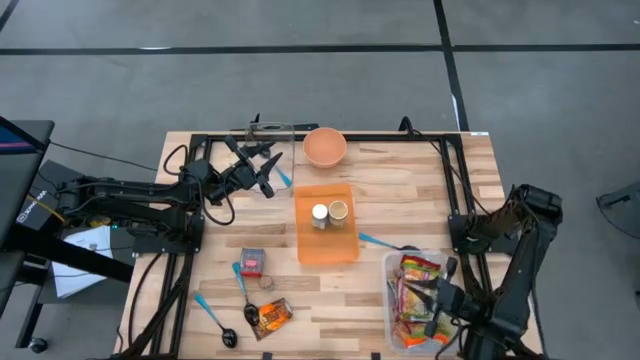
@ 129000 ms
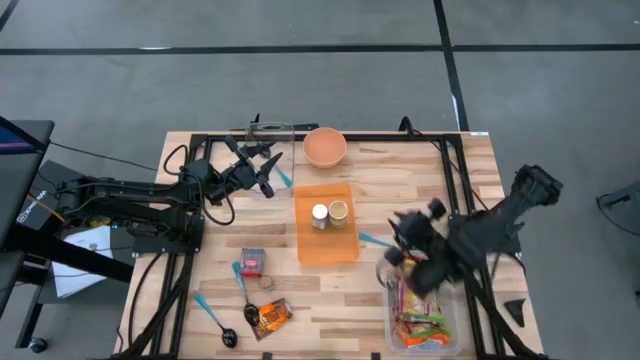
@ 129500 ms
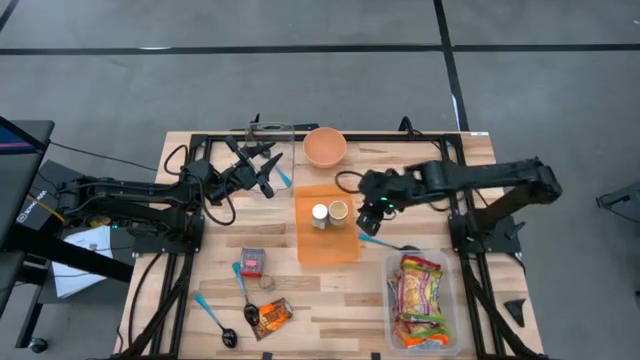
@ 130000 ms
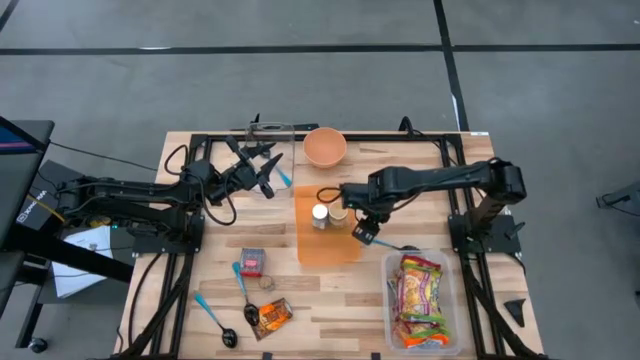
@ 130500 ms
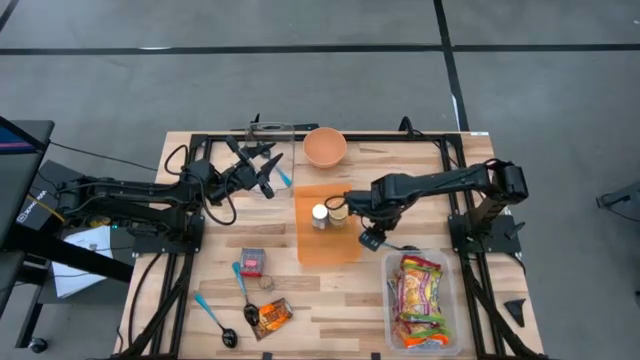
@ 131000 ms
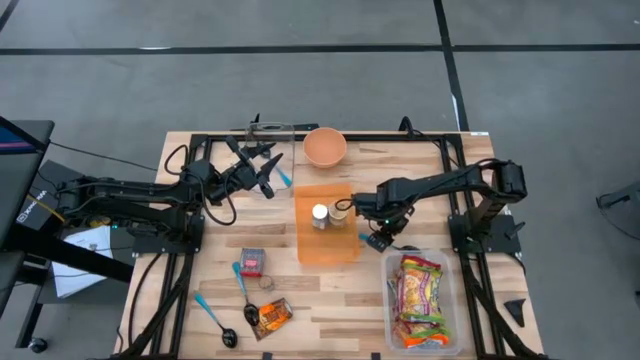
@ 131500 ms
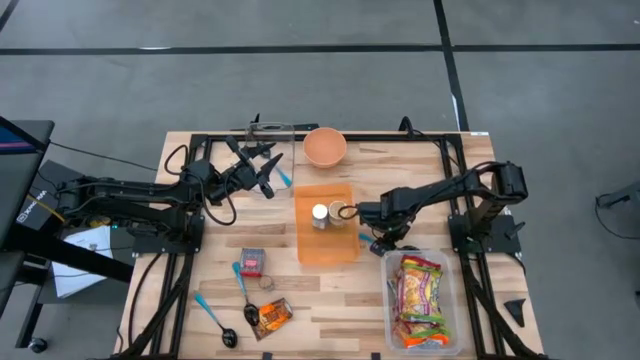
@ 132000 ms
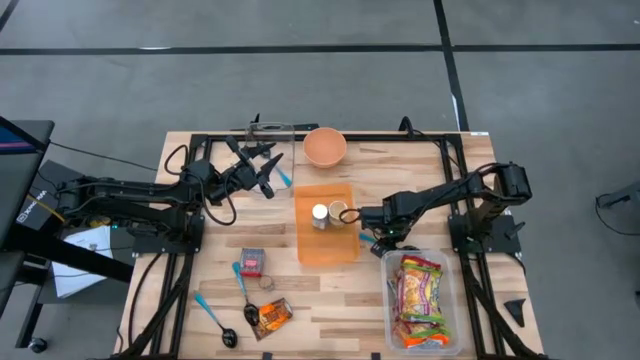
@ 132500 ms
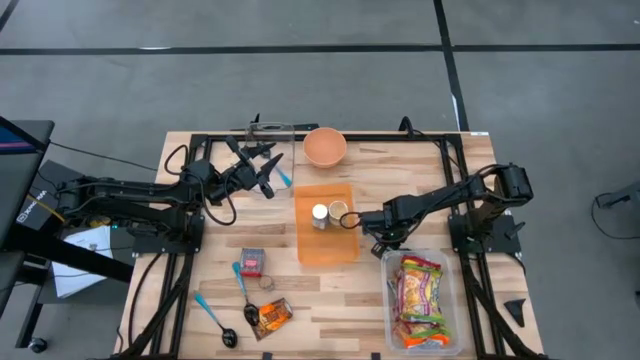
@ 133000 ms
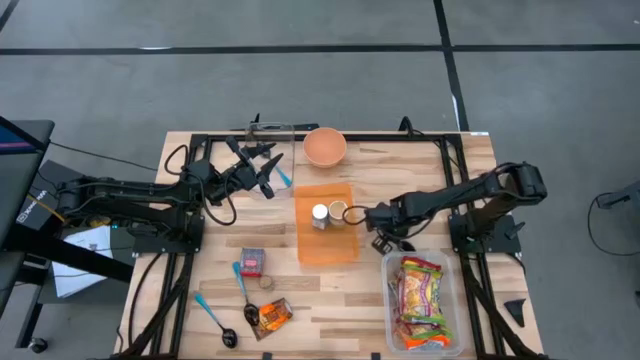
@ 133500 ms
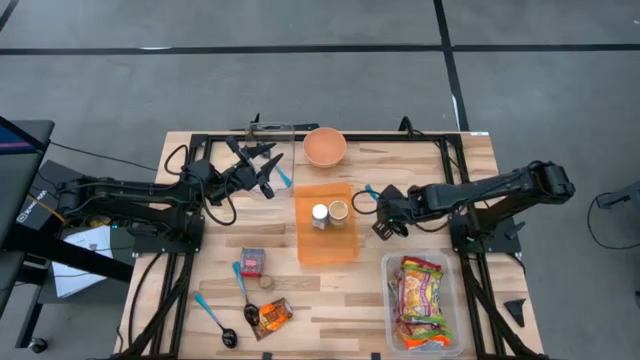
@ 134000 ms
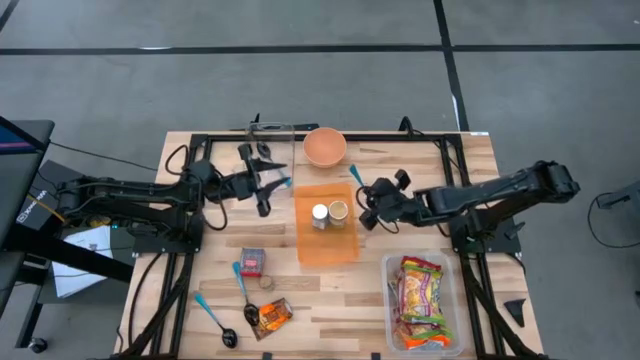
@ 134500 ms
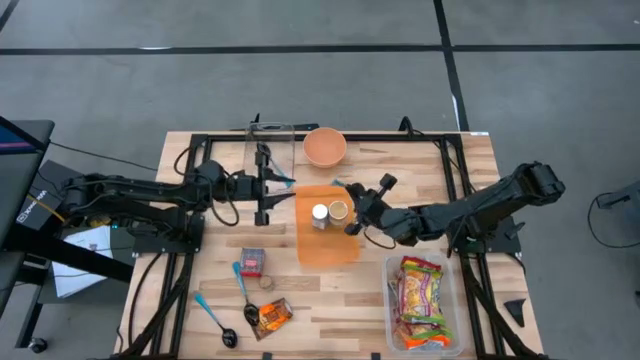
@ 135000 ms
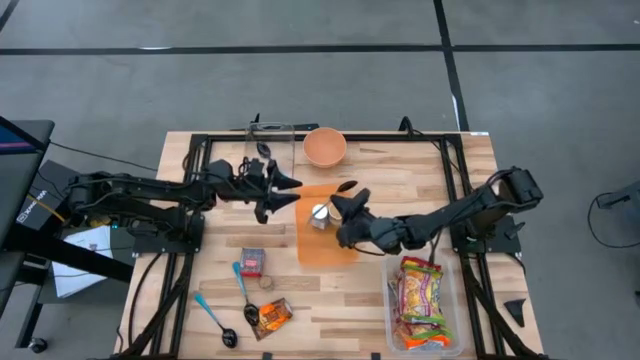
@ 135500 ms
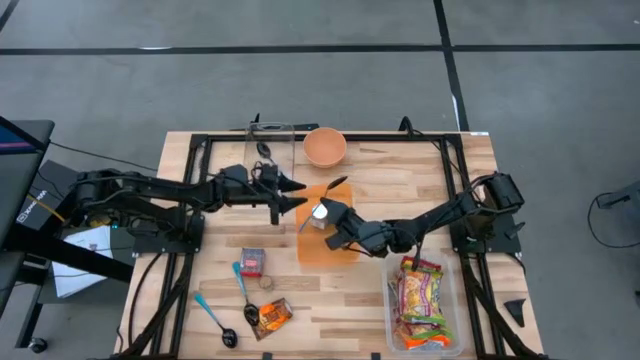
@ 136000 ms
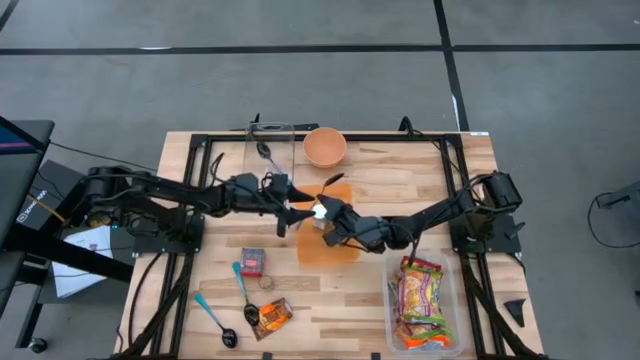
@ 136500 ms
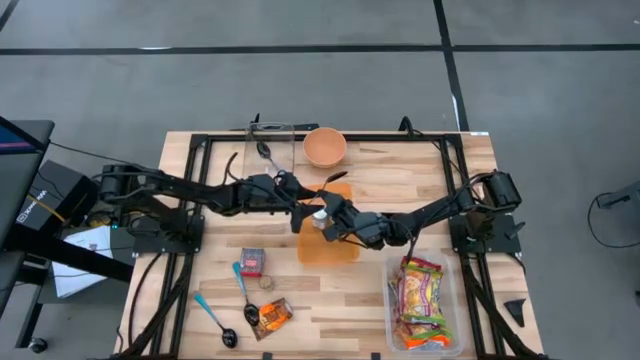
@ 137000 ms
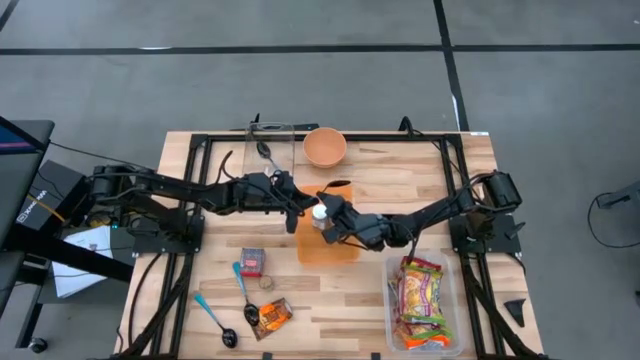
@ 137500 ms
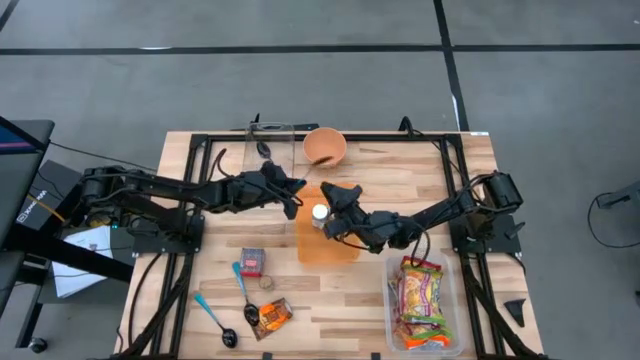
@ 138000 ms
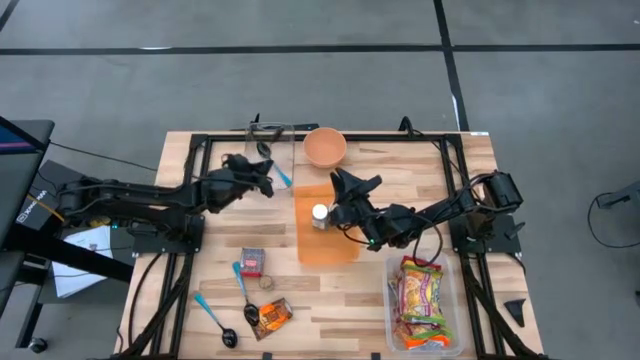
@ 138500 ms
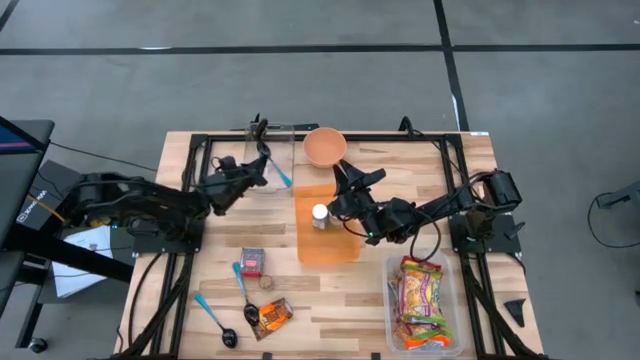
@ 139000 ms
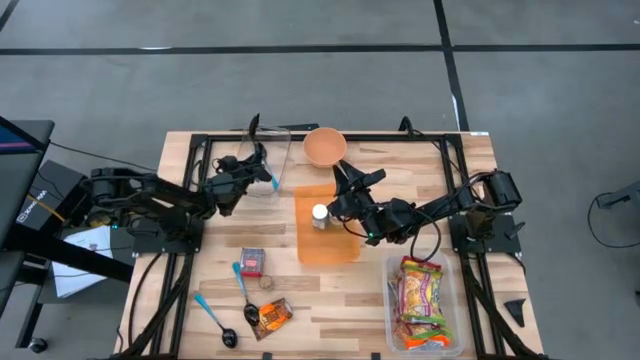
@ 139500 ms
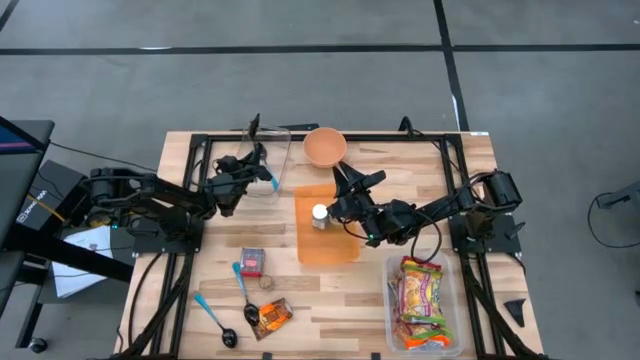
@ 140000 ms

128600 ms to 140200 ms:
Task: Pick & Place Food Item
Put the blue spoon into the transparent bin

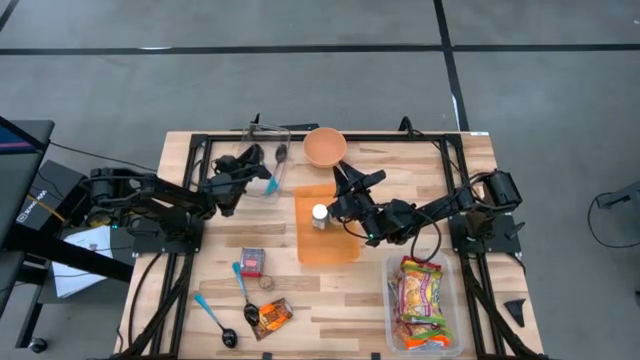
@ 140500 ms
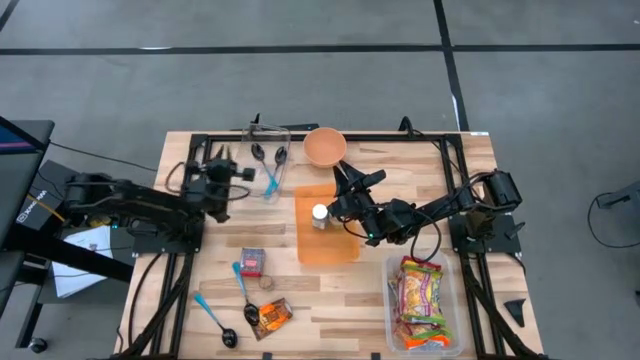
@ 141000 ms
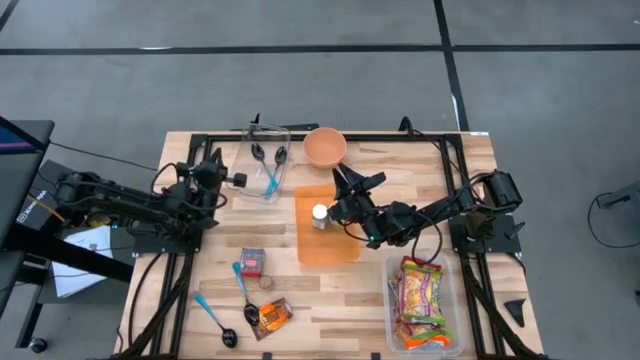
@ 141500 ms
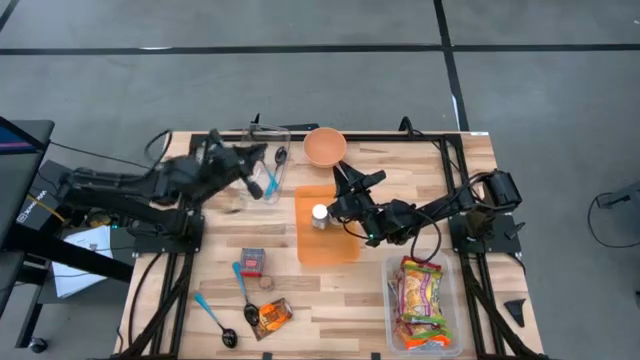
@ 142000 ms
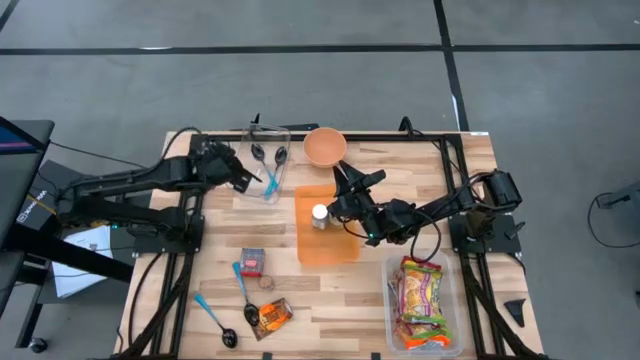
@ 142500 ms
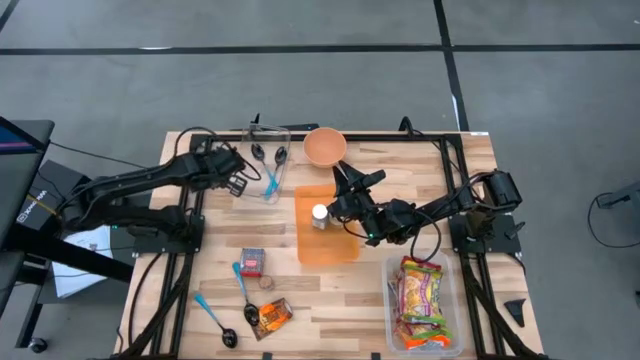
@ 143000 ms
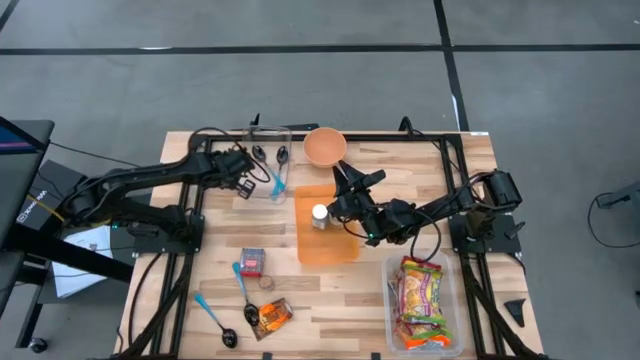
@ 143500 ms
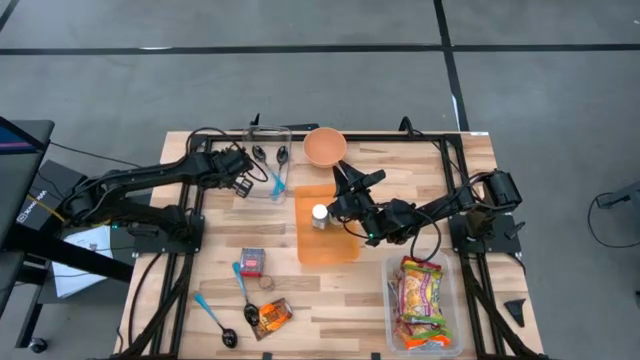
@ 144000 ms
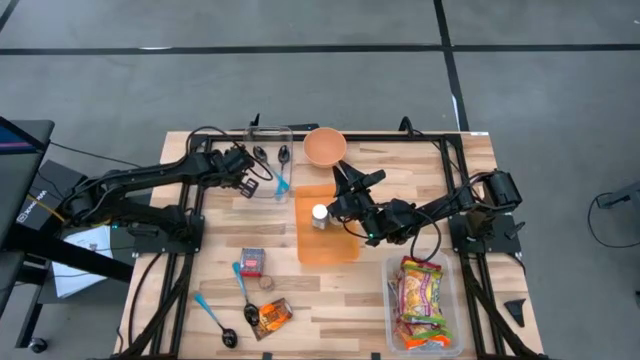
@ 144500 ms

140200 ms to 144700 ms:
Adjust the transparent bin on the table
